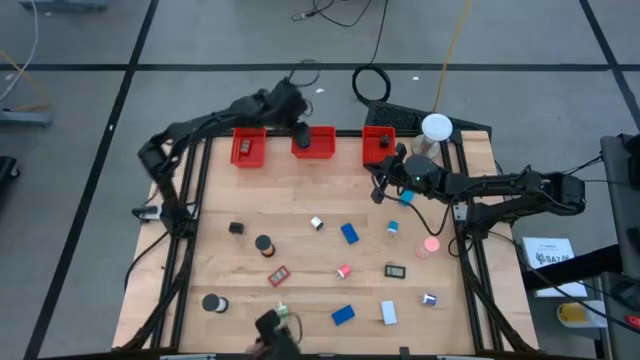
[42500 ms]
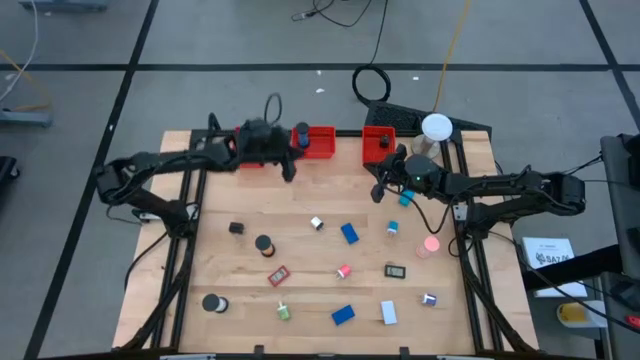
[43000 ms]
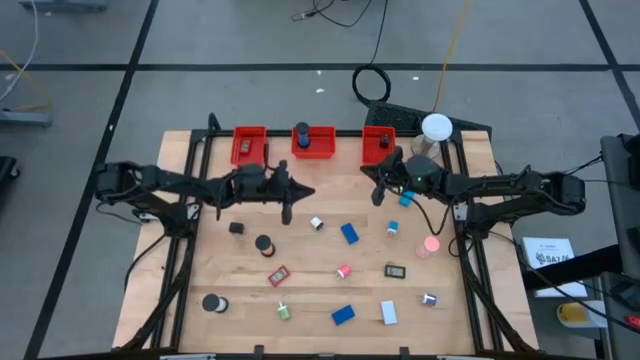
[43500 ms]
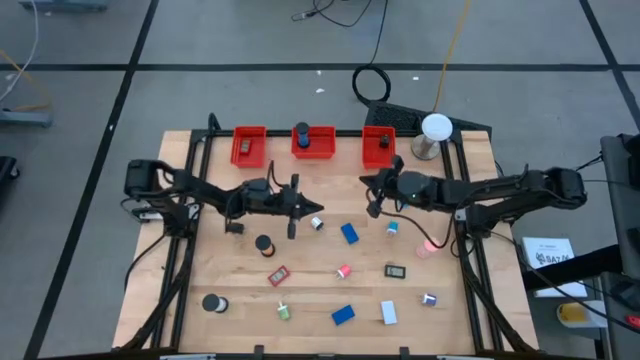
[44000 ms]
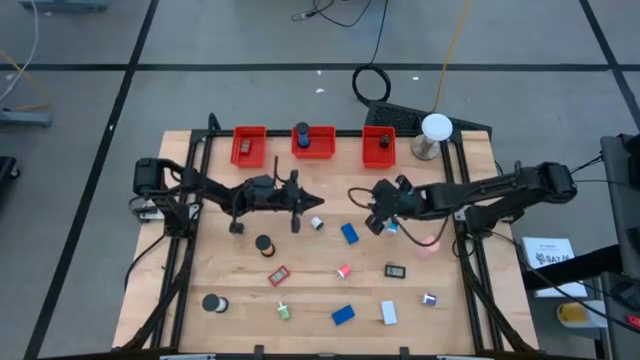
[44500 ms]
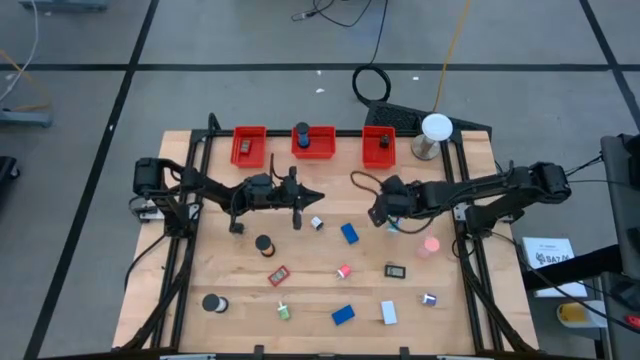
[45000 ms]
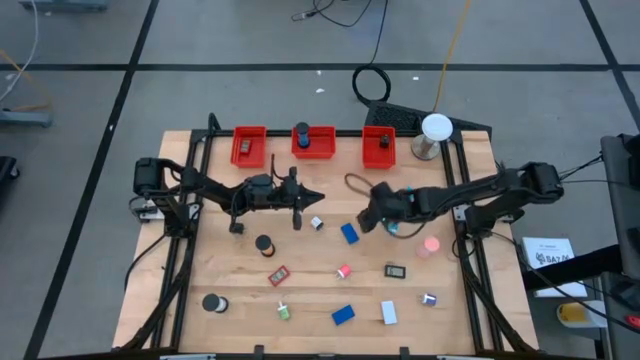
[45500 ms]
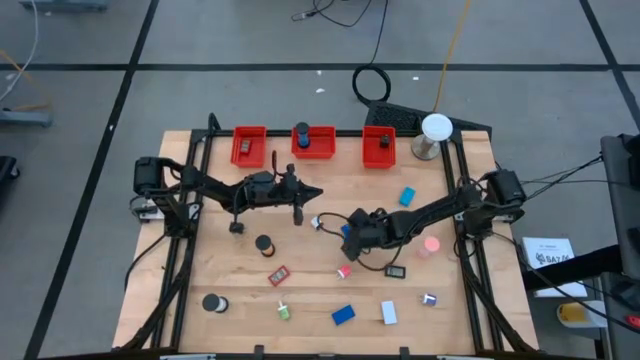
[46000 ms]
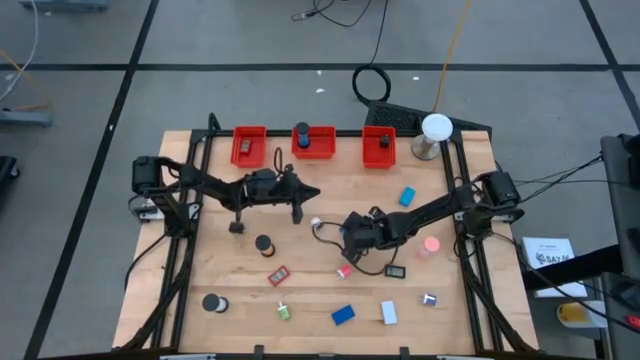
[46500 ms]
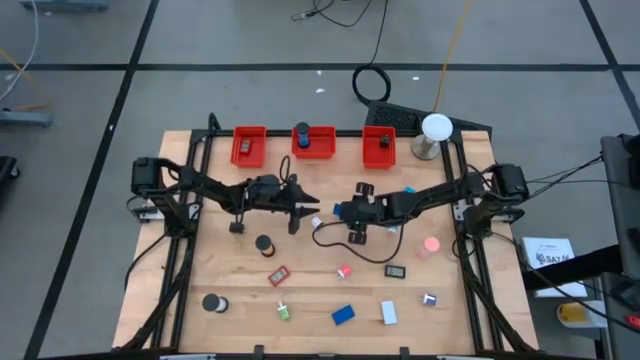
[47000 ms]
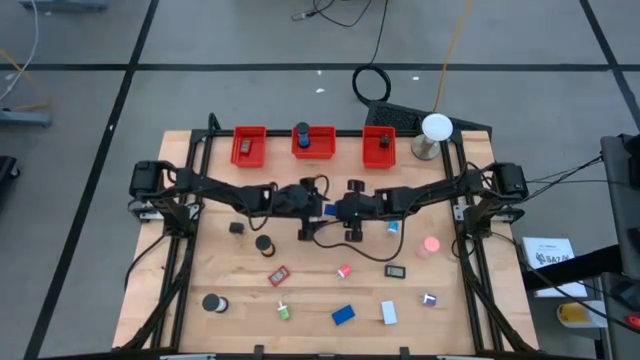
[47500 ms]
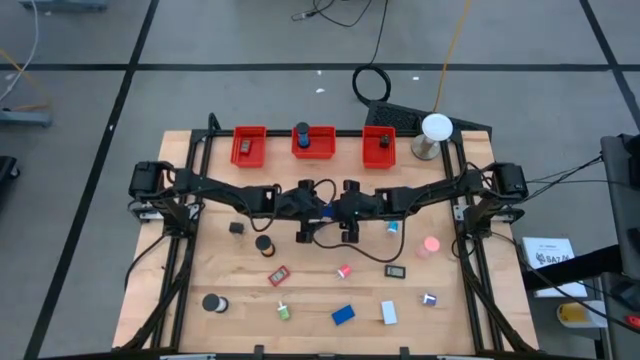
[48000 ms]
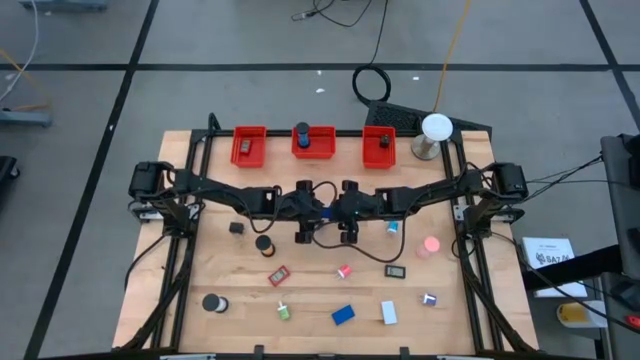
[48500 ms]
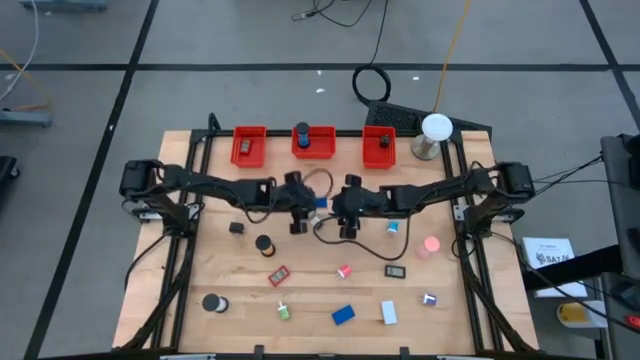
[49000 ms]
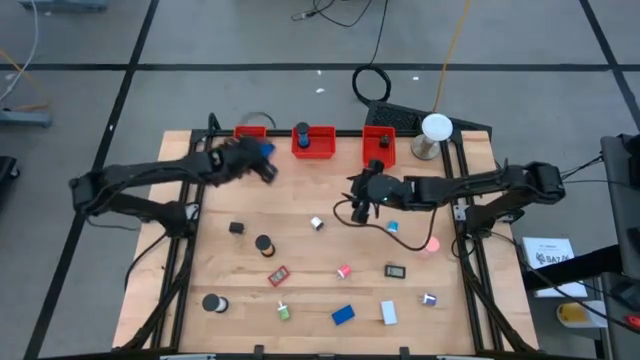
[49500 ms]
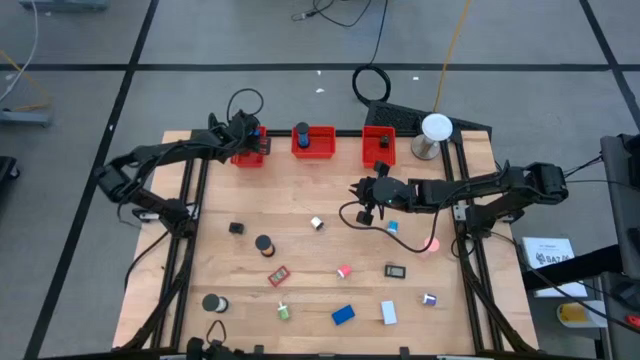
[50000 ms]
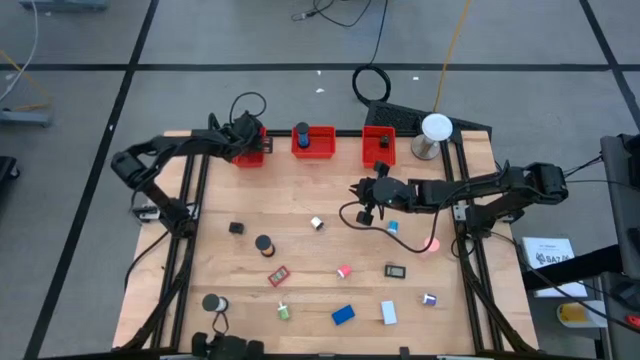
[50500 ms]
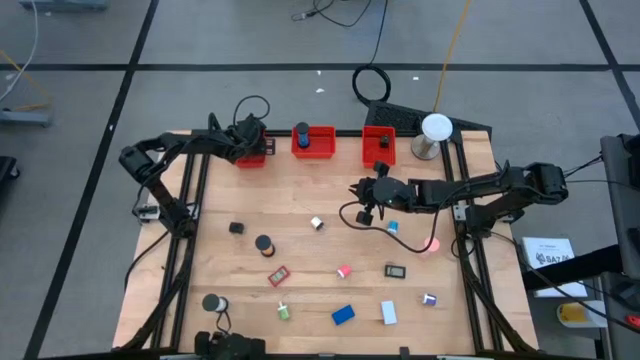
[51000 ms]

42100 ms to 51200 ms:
Task: Pick & Place Office items
Put the top left blue timer into the left orange basket

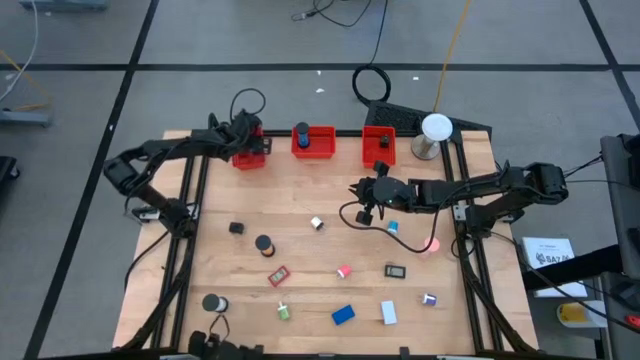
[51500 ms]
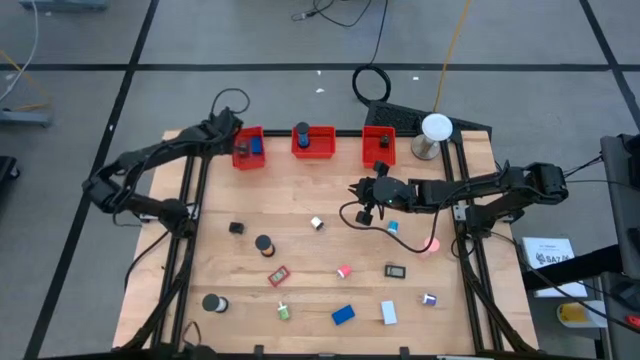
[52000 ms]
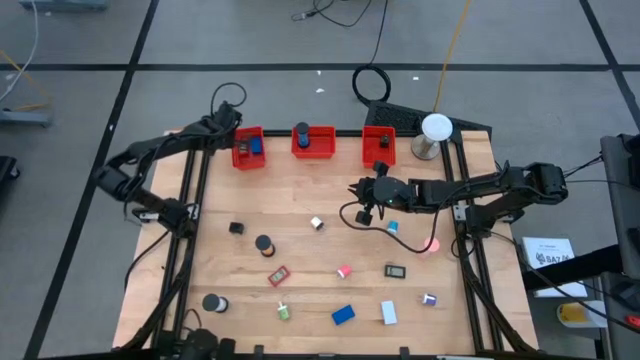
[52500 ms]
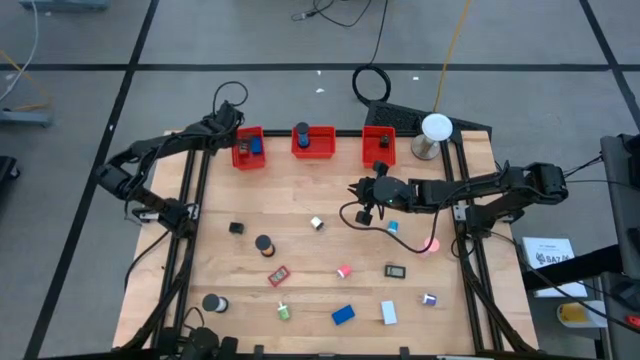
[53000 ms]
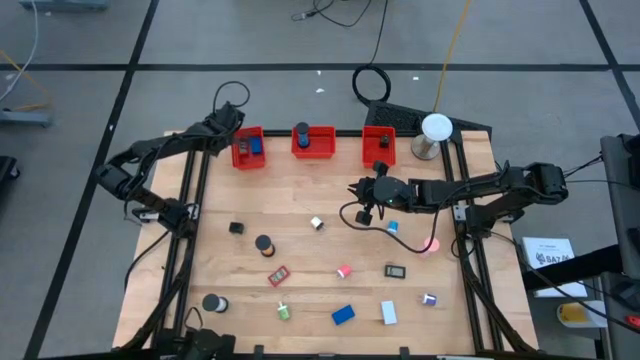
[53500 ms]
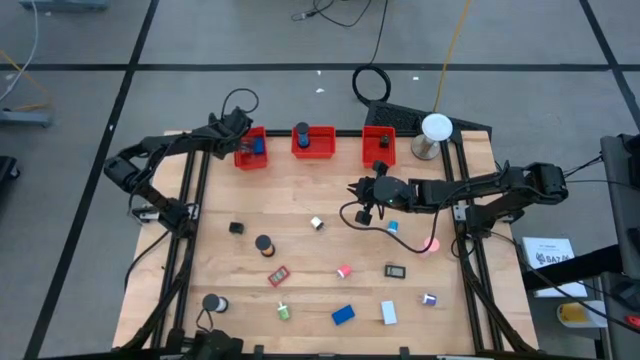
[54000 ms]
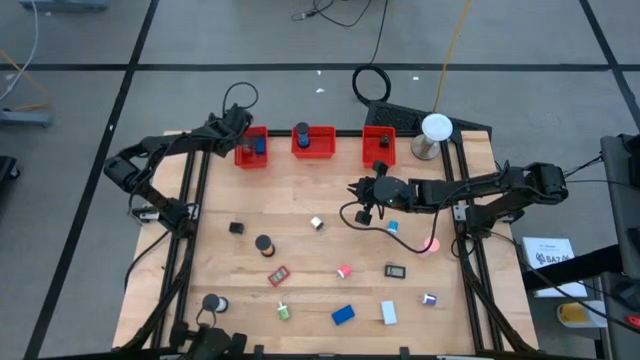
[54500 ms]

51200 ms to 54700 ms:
Adjust the left orange basket

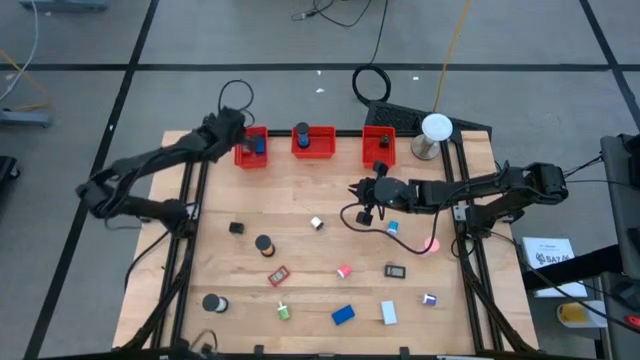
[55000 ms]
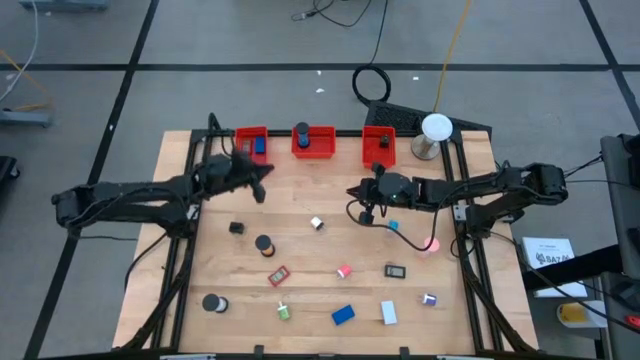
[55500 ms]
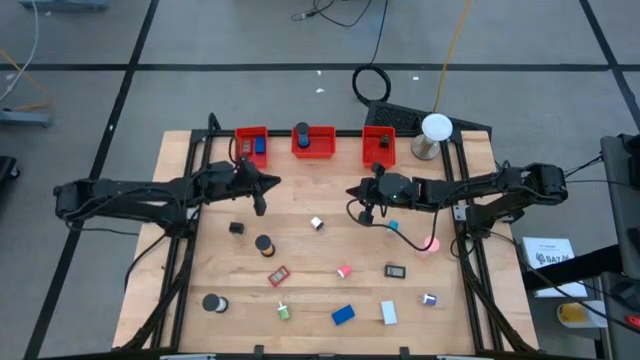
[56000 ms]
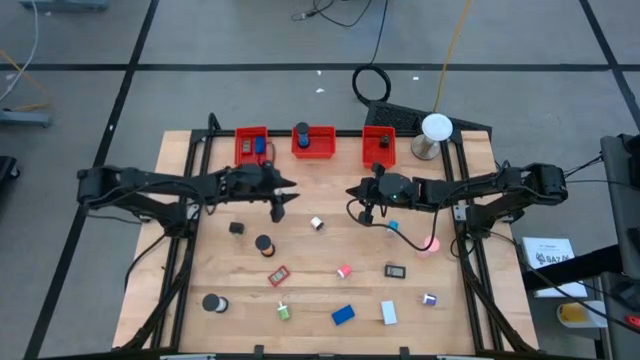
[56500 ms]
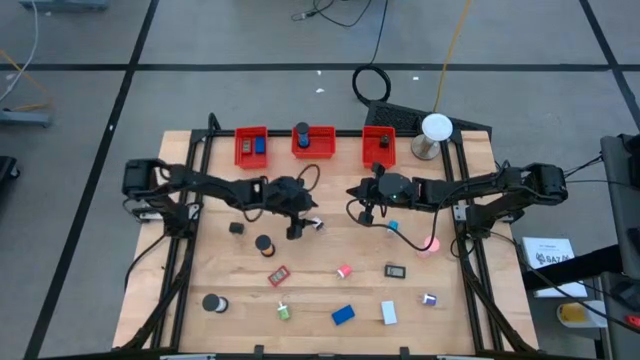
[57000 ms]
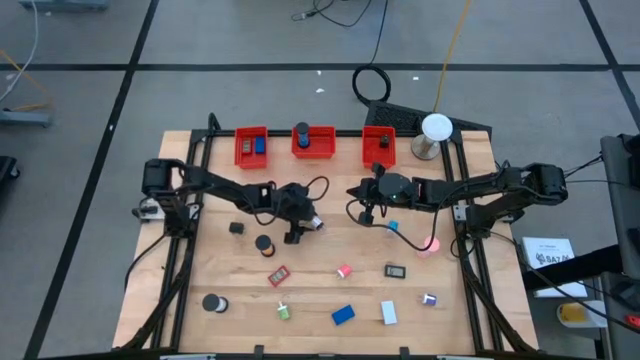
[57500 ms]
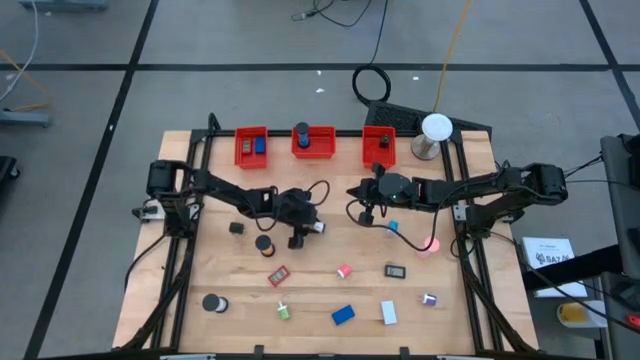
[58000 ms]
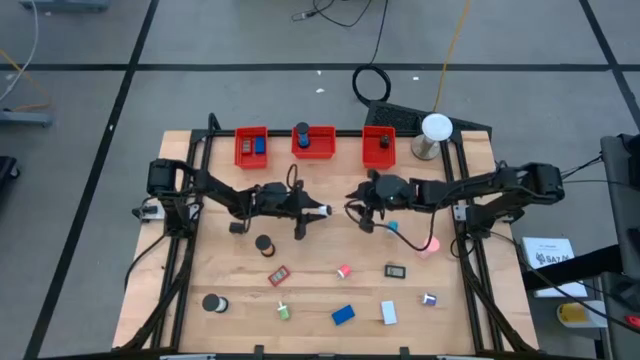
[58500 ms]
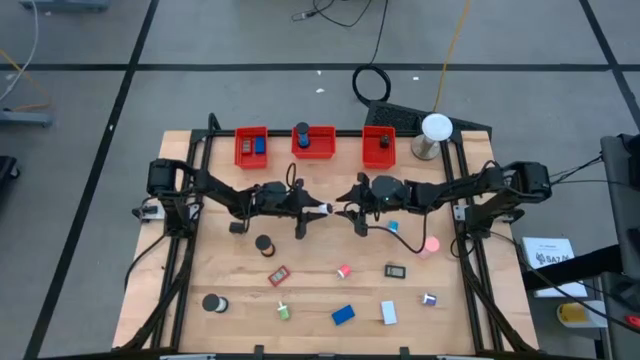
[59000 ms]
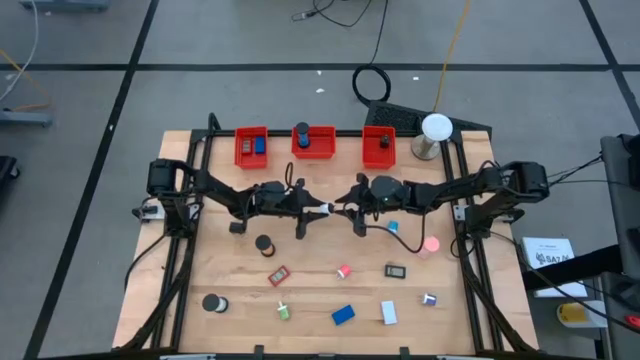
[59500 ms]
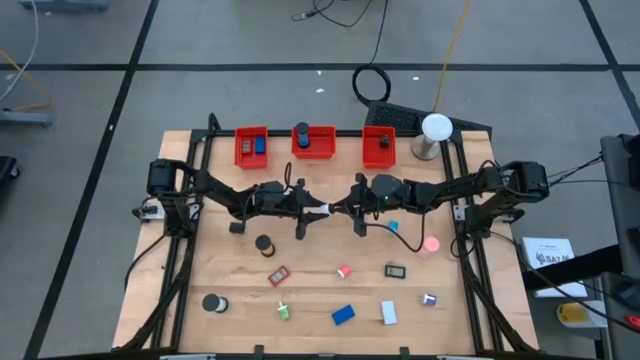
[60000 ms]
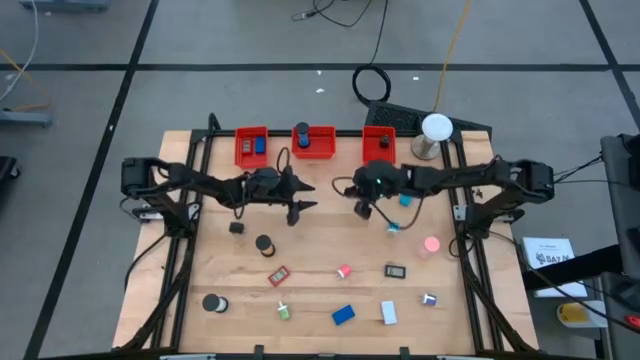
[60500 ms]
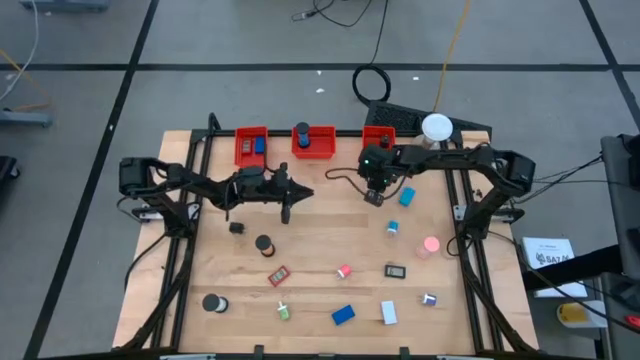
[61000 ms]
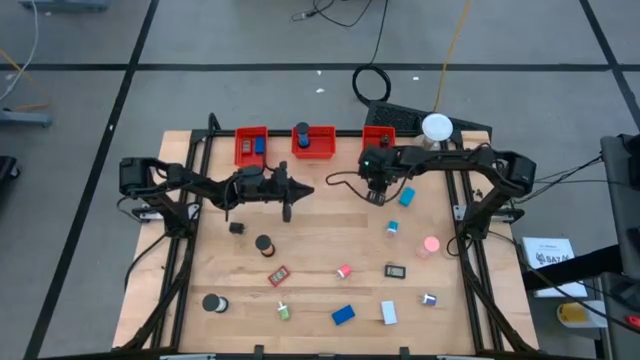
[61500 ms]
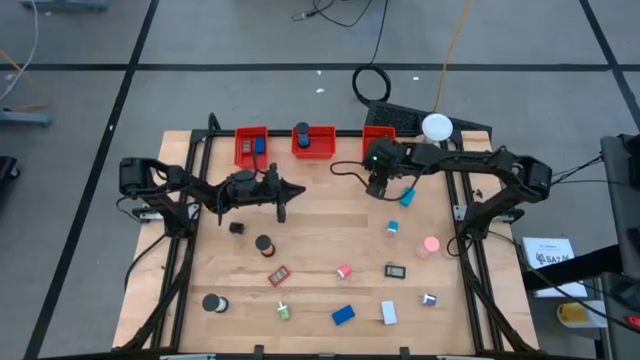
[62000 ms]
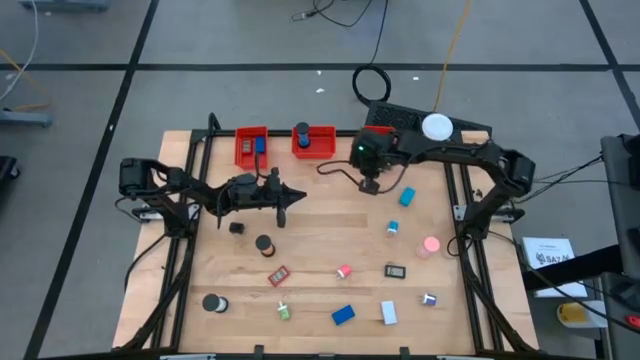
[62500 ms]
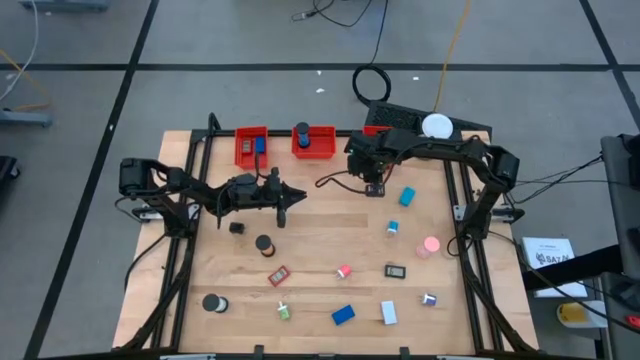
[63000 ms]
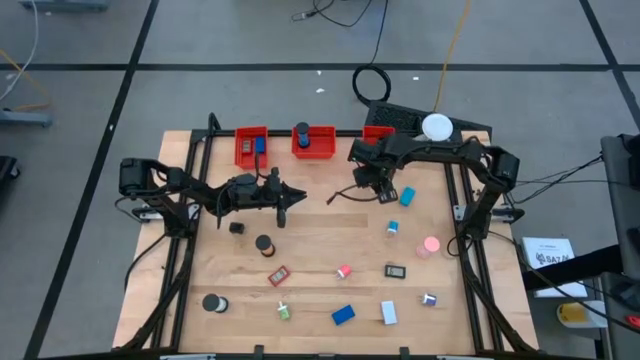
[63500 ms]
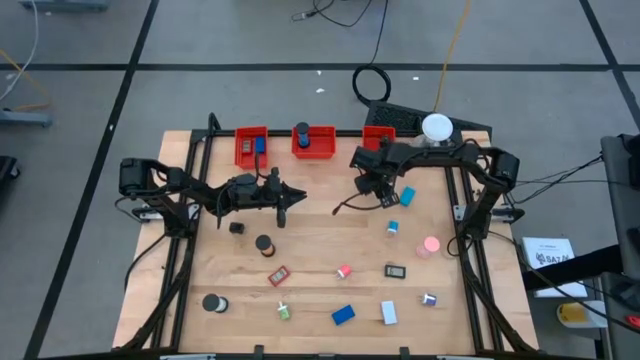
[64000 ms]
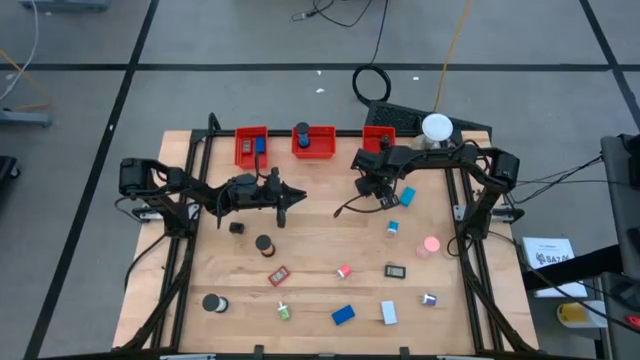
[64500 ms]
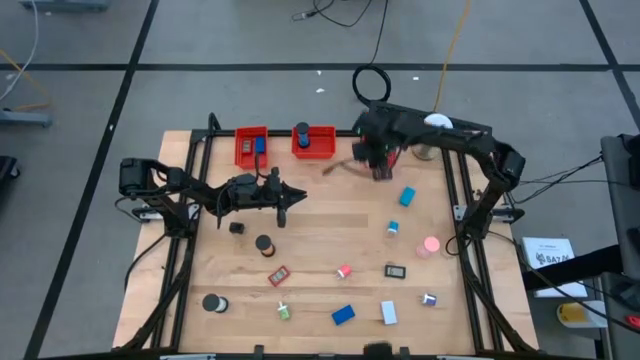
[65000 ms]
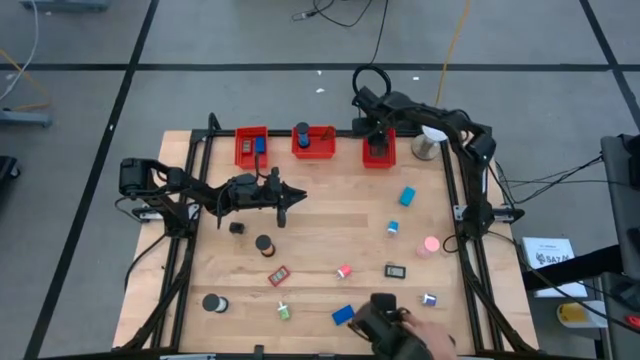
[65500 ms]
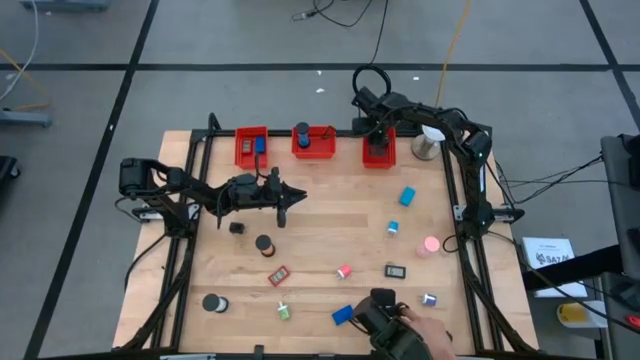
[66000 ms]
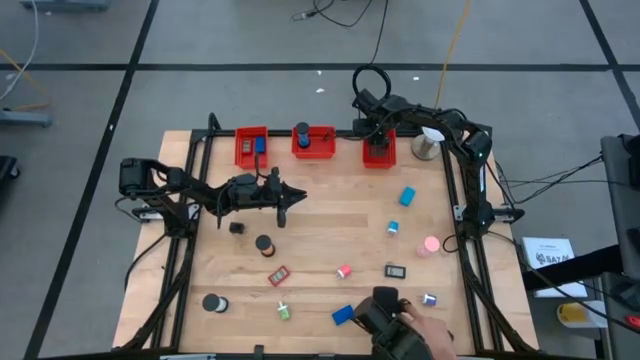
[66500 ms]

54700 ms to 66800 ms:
Put the white charger adapter into the right orange basket
